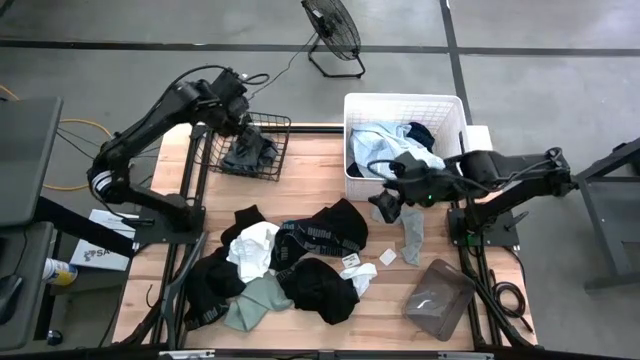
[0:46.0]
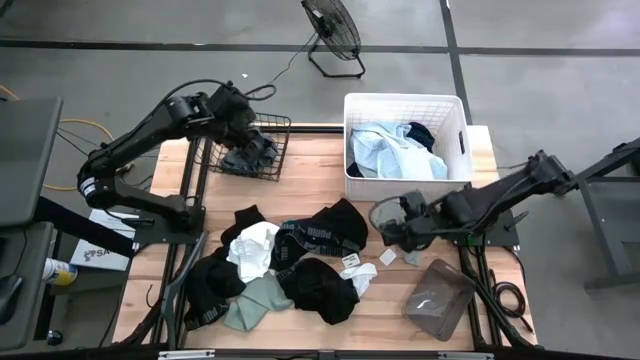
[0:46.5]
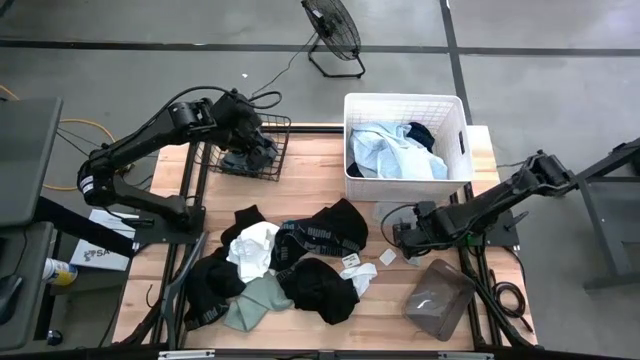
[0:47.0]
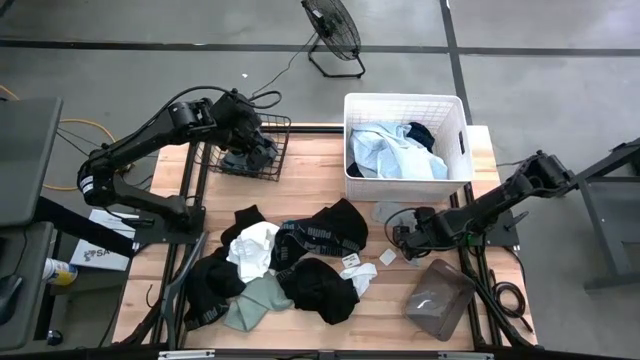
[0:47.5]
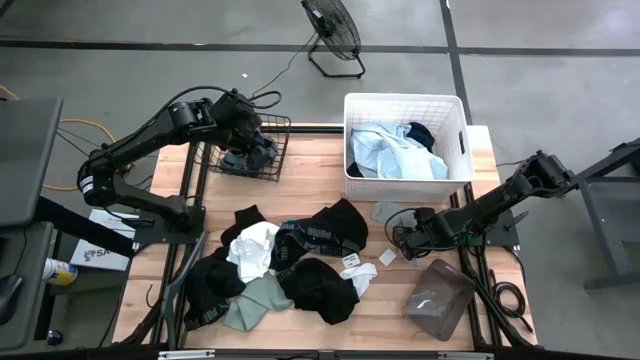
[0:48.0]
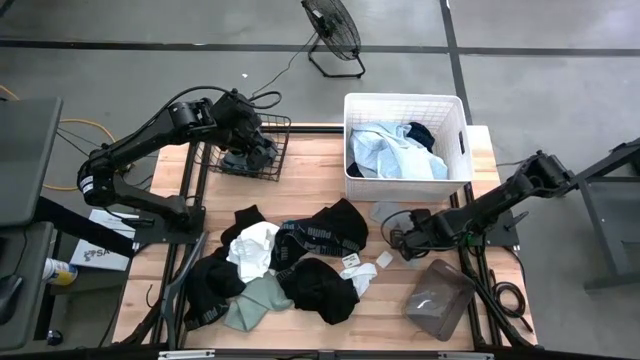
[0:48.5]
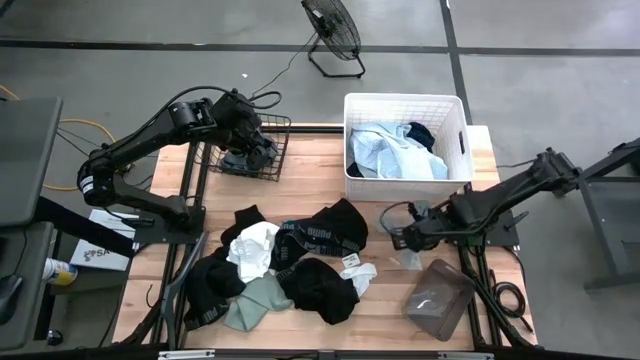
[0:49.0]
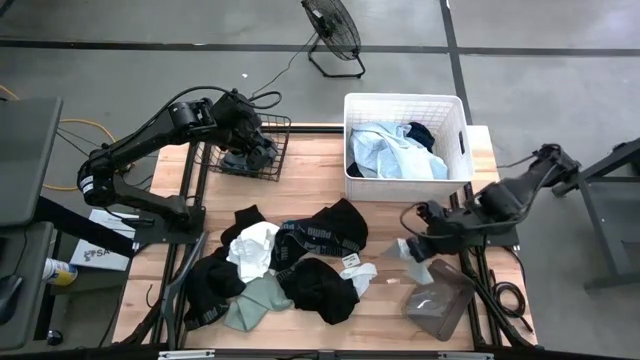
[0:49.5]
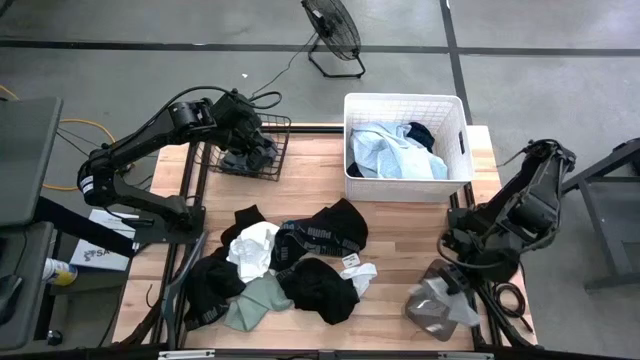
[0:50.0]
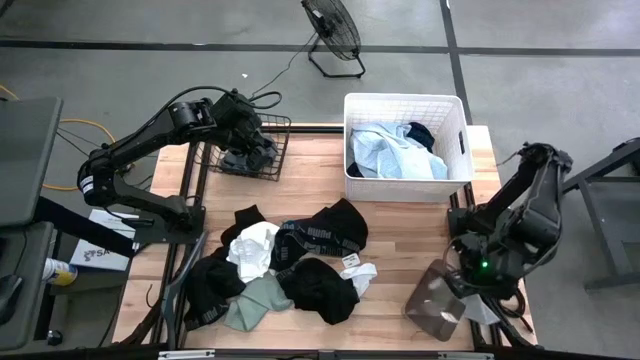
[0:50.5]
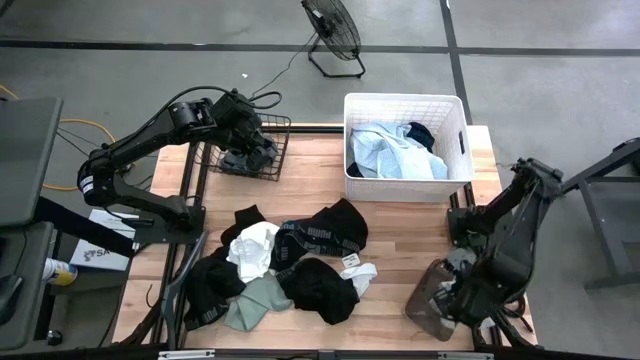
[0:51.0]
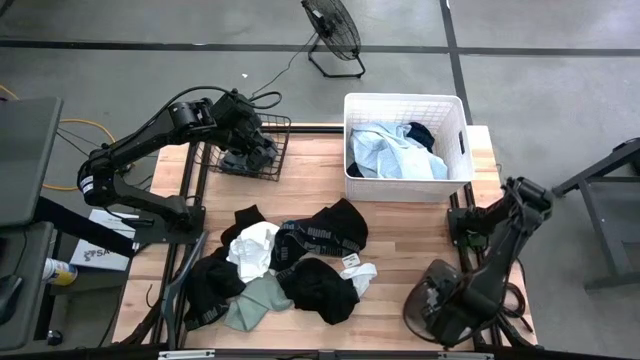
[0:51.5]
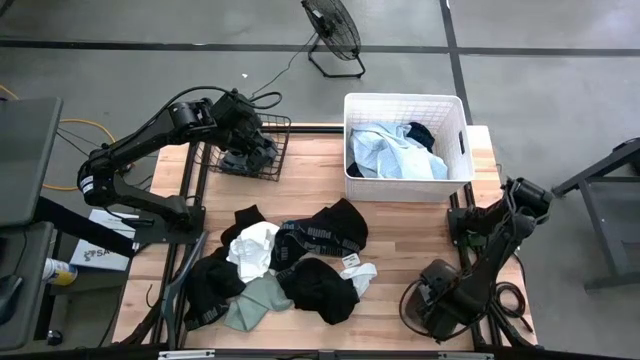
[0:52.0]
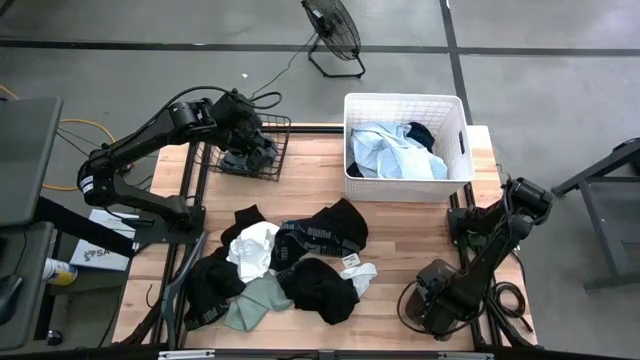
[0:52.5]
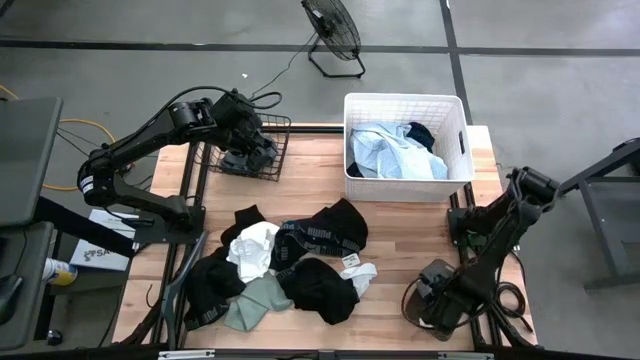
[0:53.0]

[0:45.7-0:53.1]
Task: Pick & Place Cloths
Put the light gray sock into the black bin

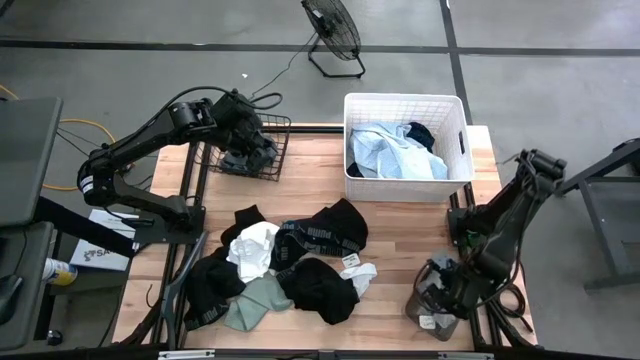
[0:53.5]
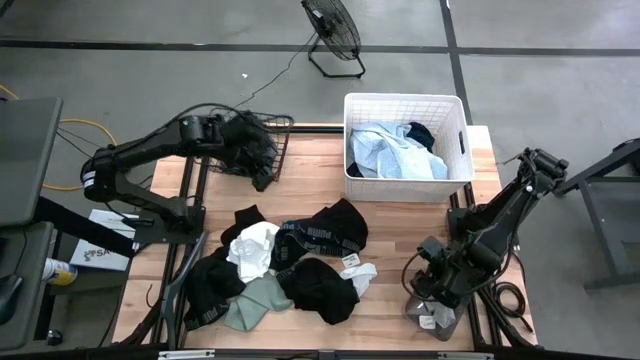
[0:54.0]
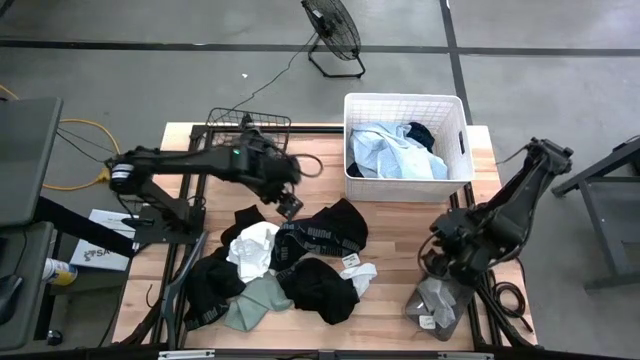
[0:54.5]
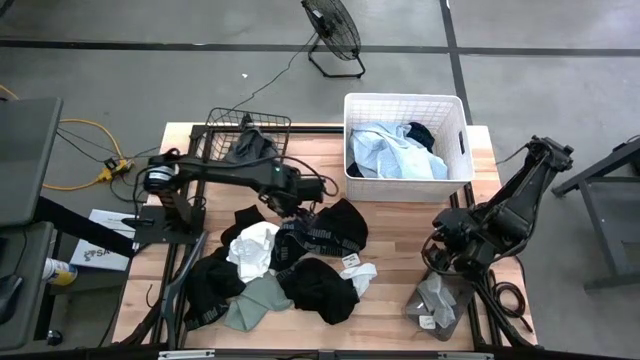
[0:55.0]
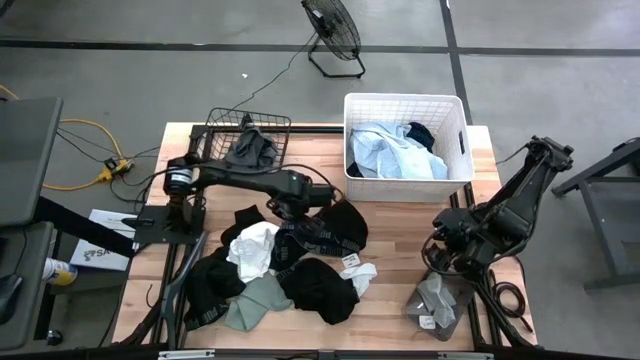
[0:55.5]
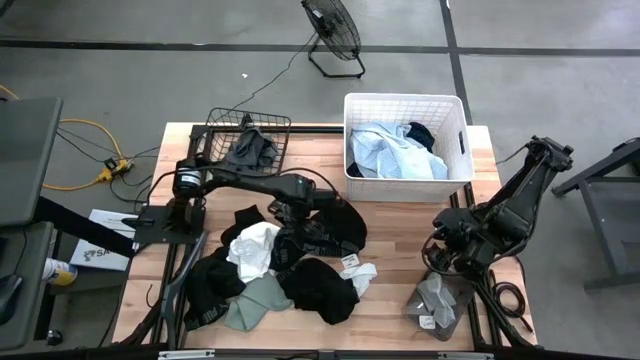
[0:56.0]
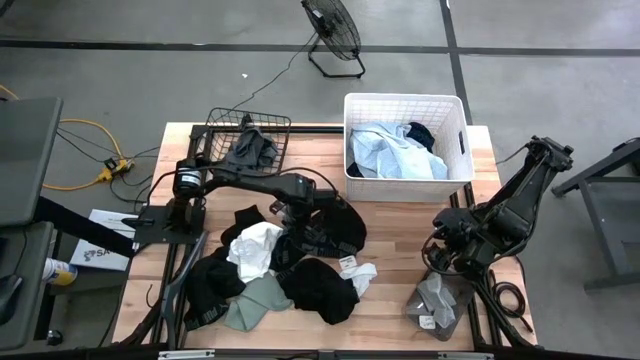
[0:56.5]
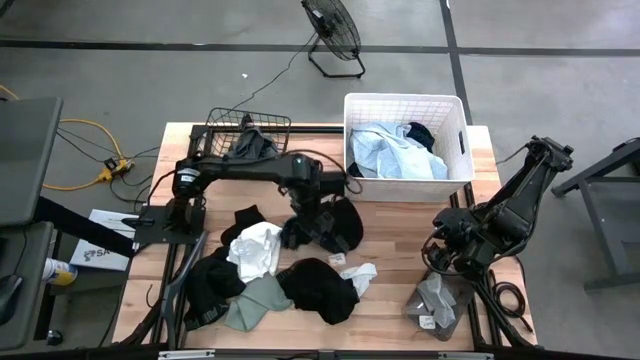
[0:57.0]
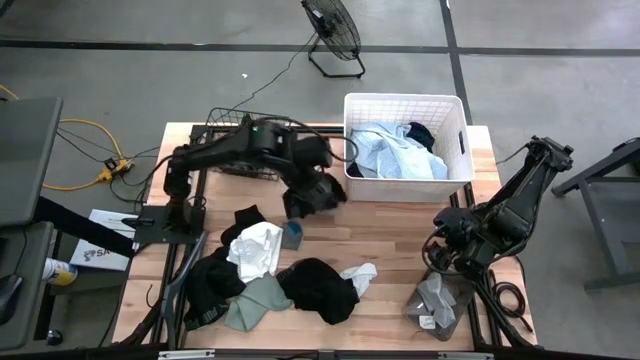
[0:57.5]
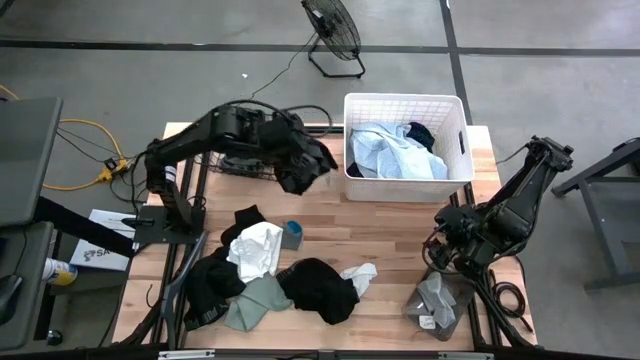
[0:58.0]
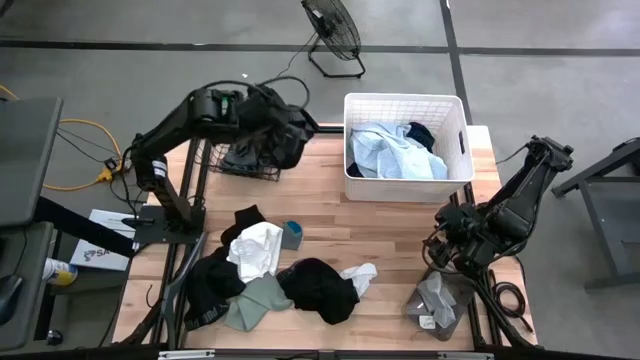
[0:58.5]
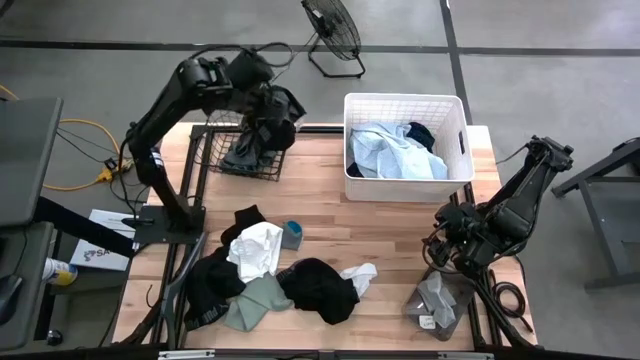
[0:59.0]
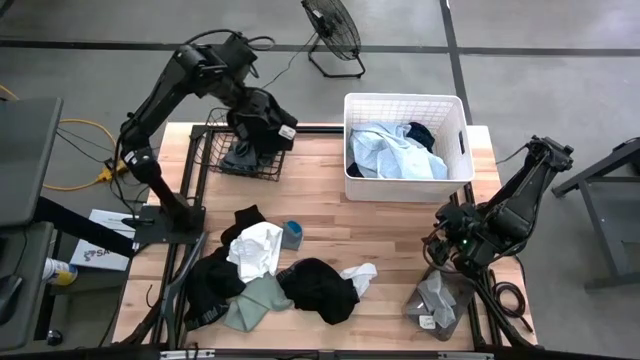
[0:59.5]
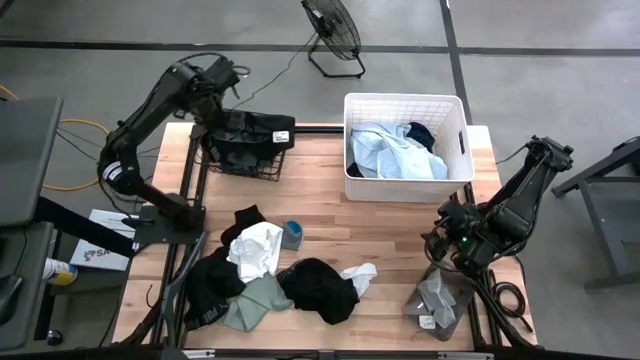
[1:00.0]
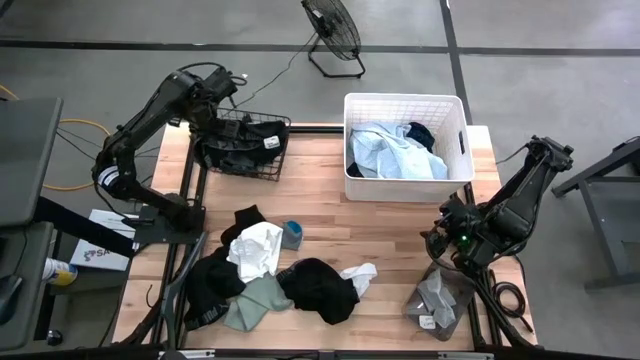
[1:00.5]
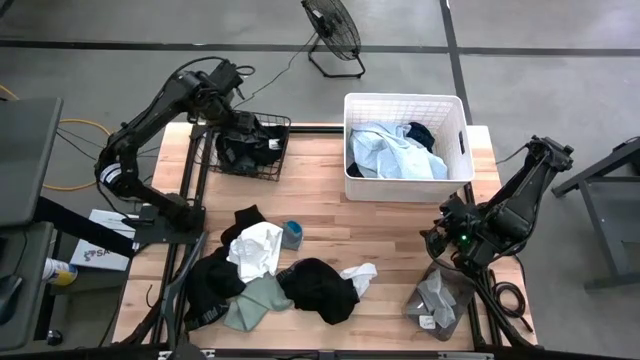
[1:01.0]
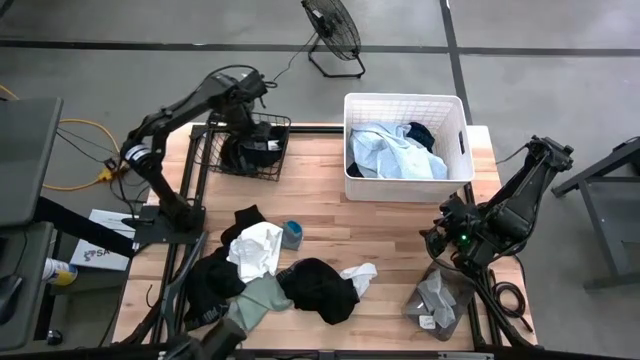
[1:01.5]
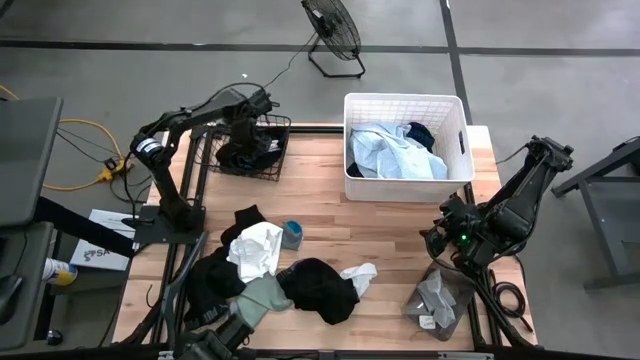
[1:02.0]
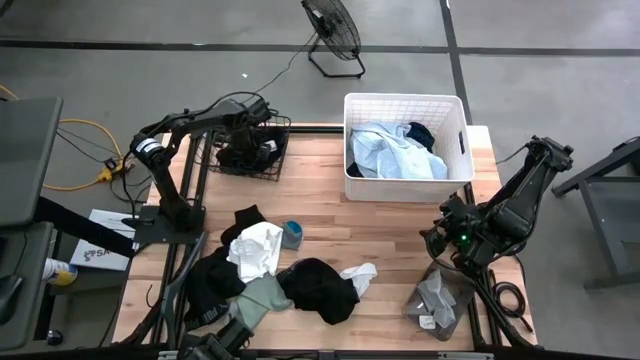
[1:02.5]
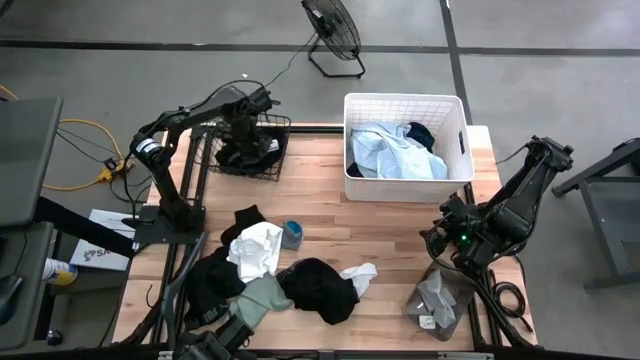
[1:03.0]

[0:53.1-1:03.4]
Put the top black boxer shorts into the black wire basket

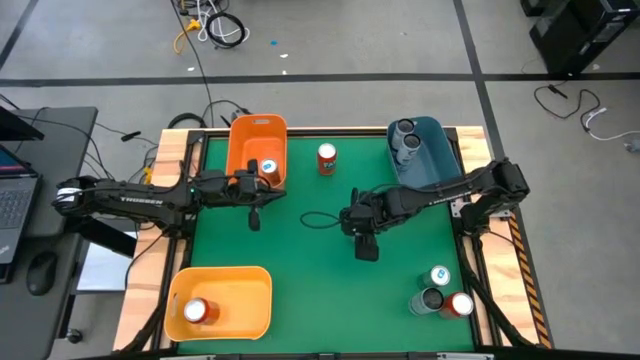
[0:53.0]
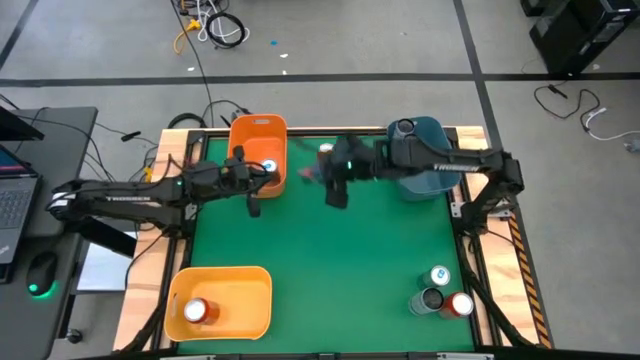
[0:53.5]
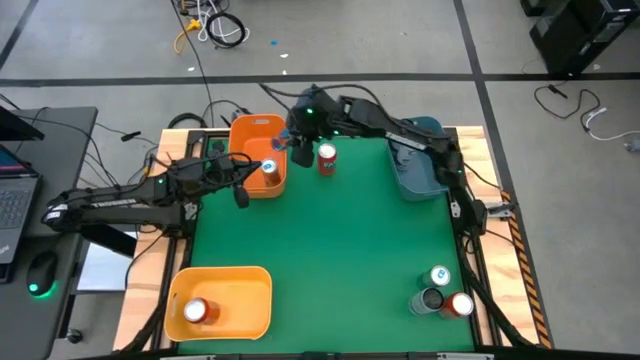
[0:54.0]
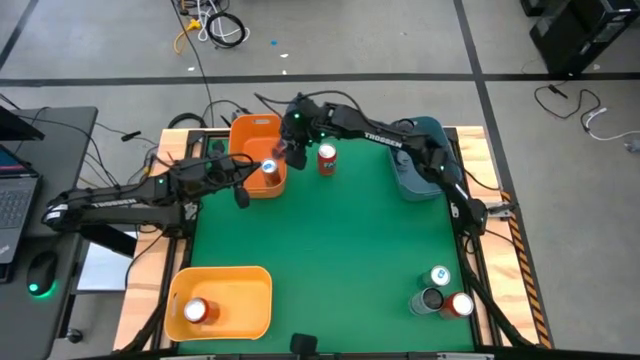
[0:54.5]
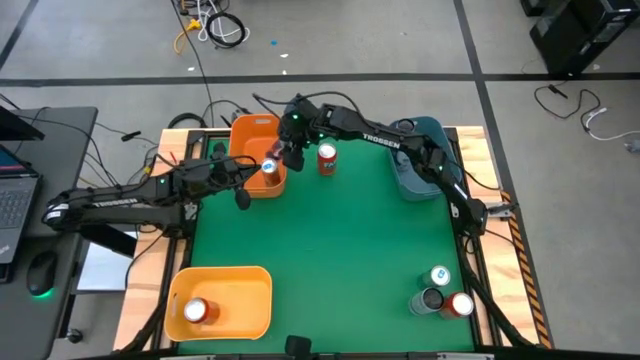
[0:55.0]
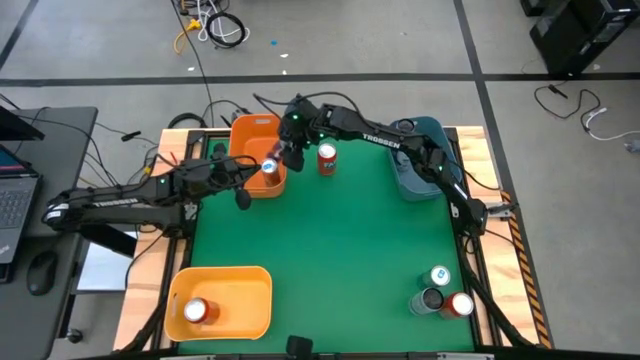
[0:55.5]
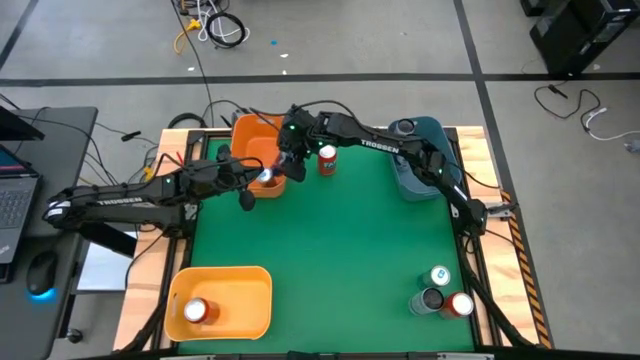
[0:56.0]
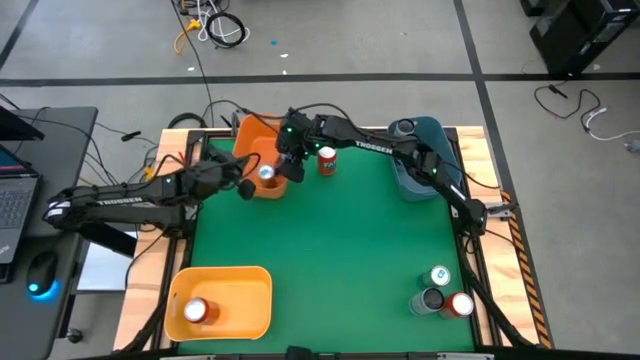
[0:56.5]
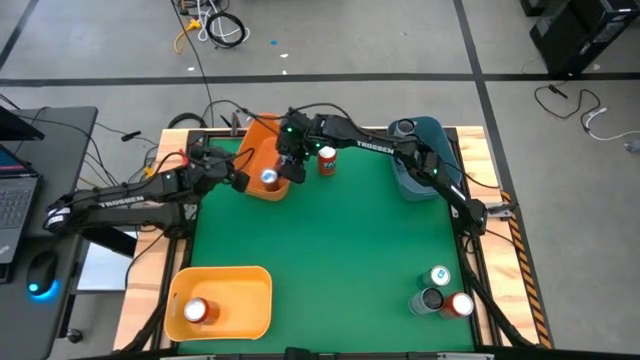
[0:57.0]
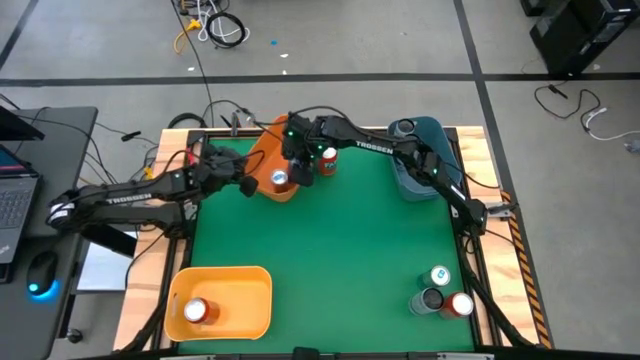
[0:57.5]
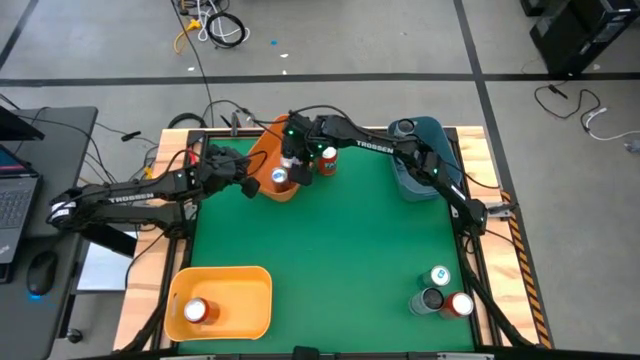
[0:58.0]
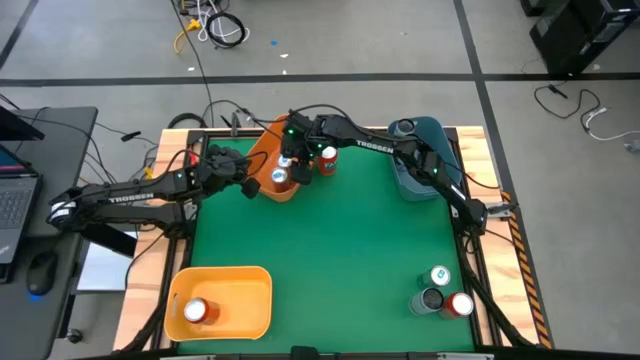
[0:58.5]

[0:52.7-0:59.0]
Task: Sort soda cans
Put the left blue soda can into the orange bin
